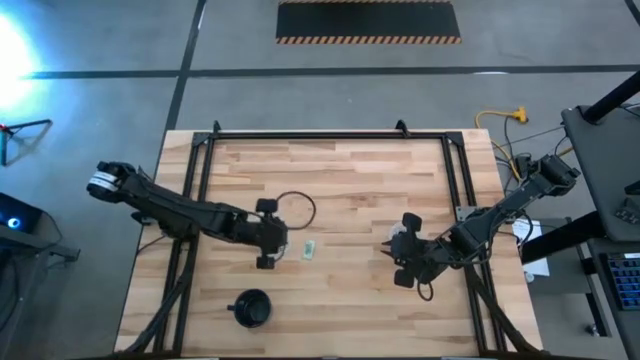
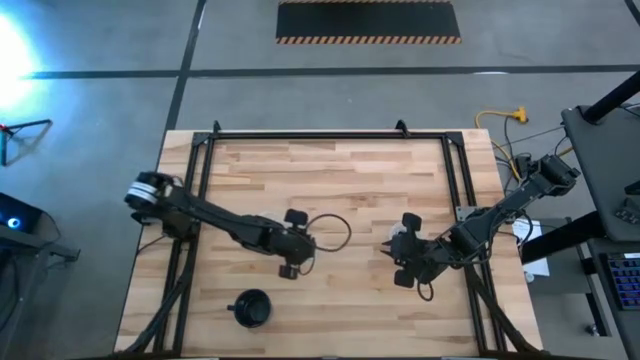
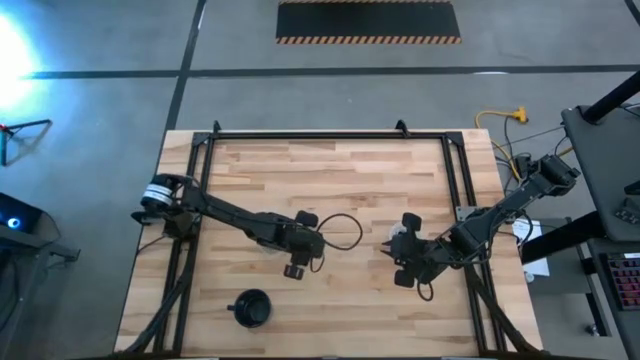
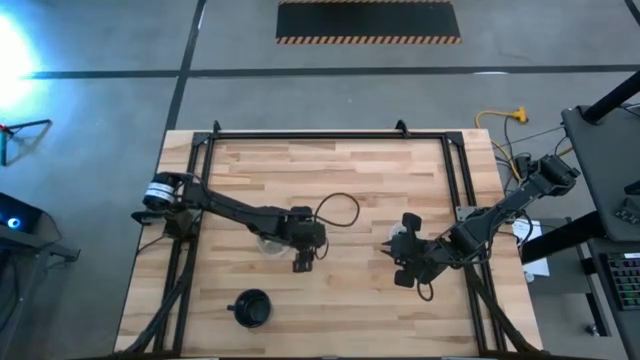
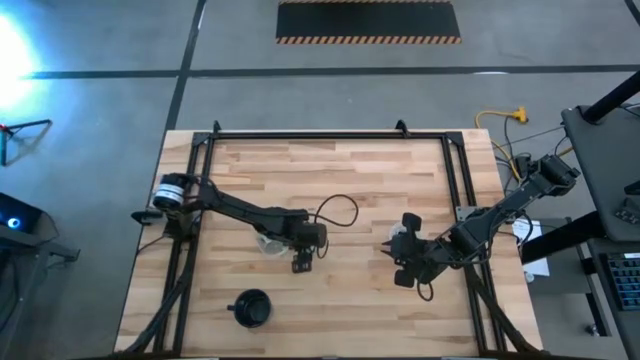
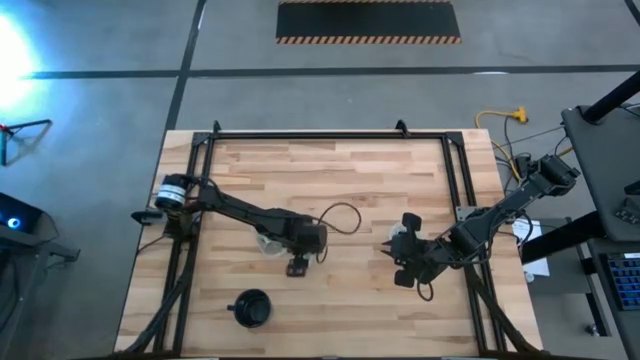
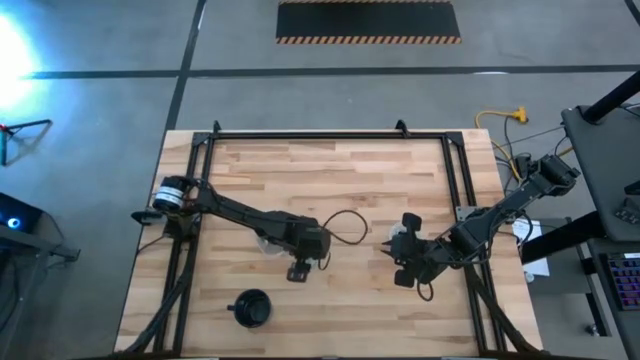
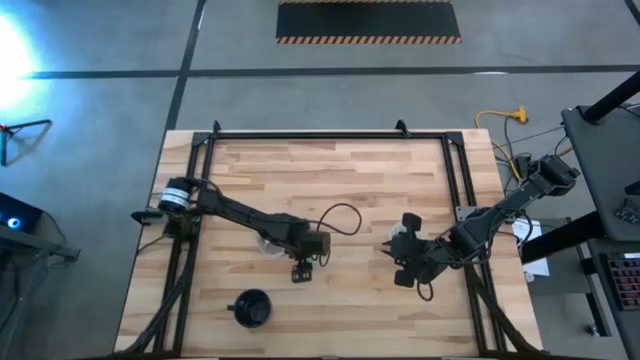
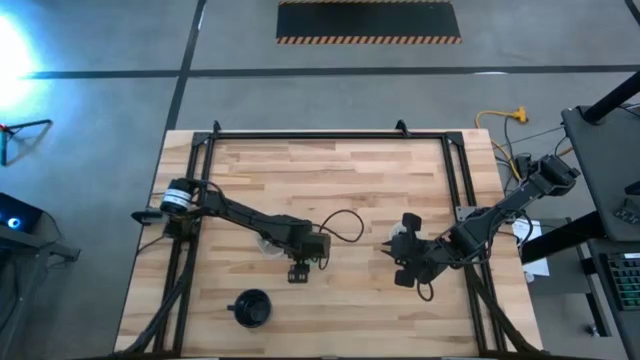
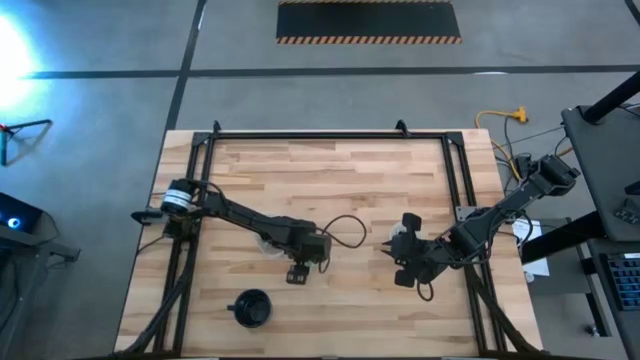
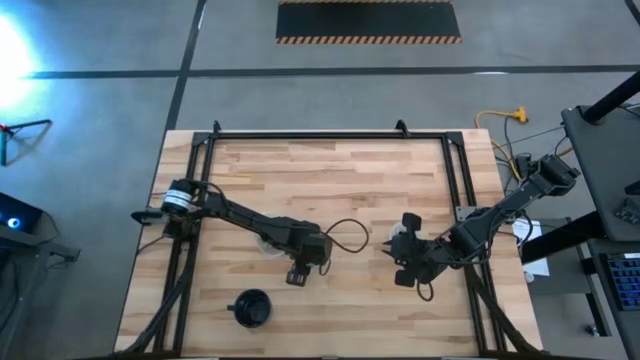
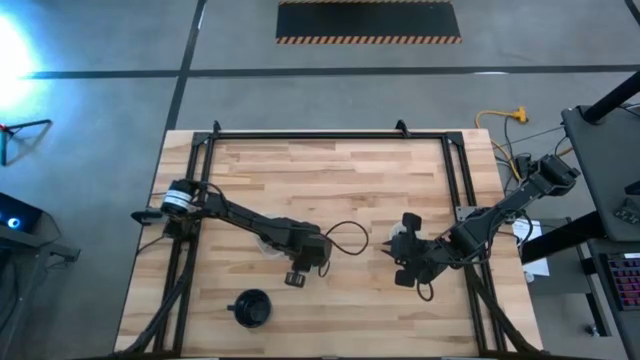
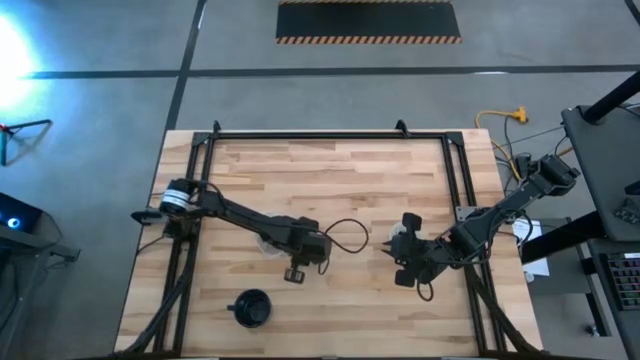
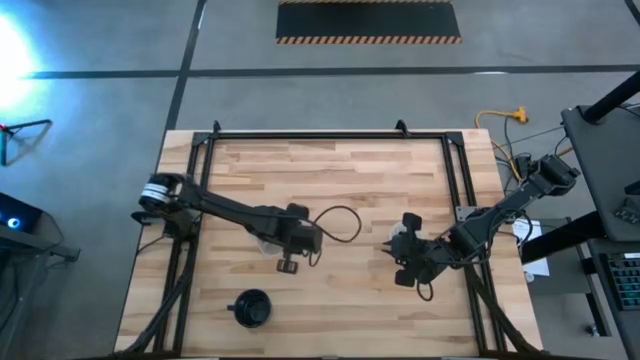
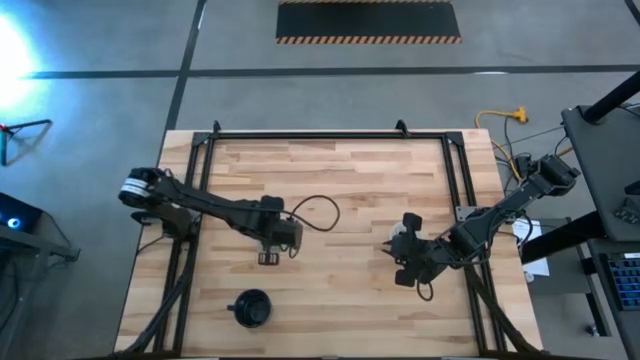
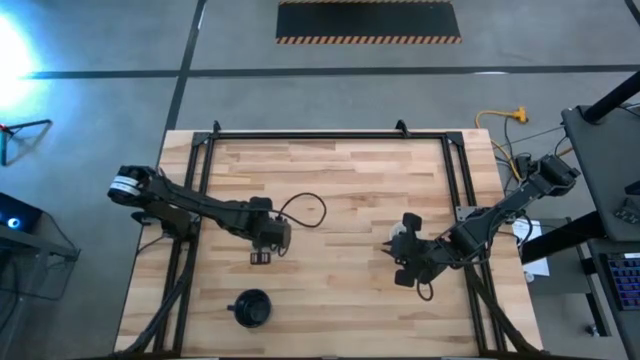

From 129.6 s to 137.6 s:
Task: Pick and place Stevia / Truvia into bins
Put the stevia packet into the oval transparent container

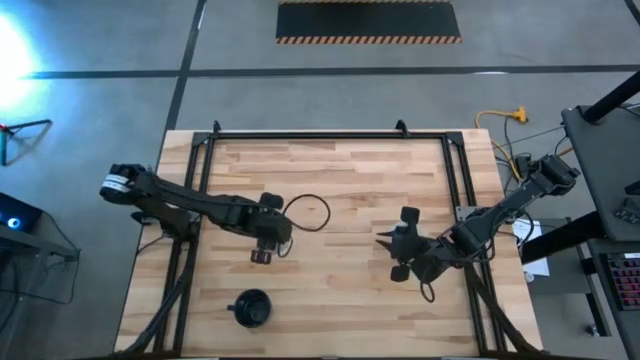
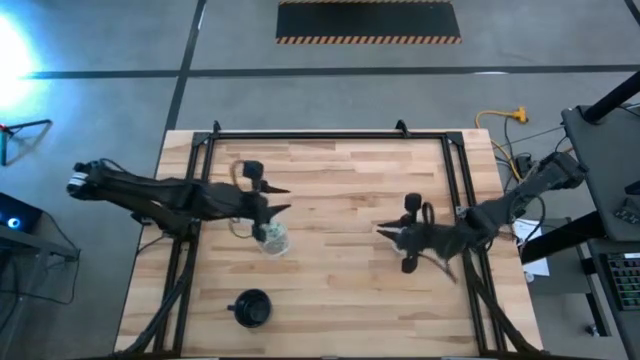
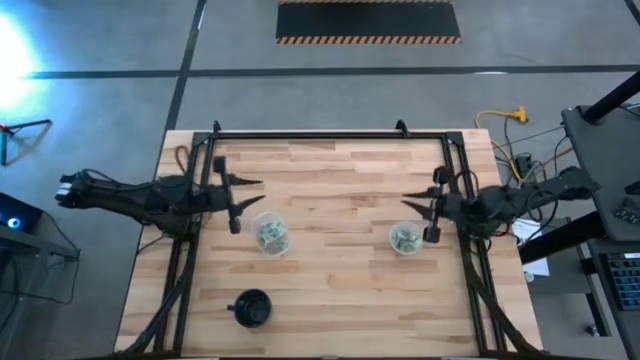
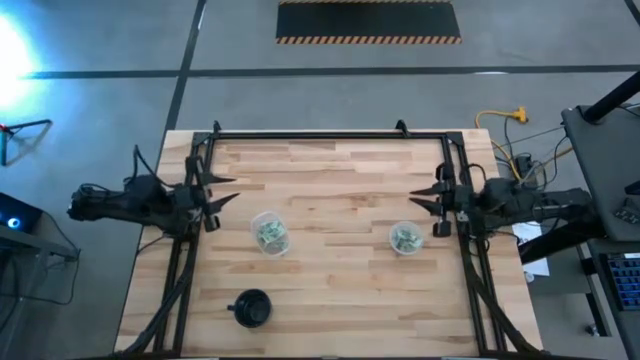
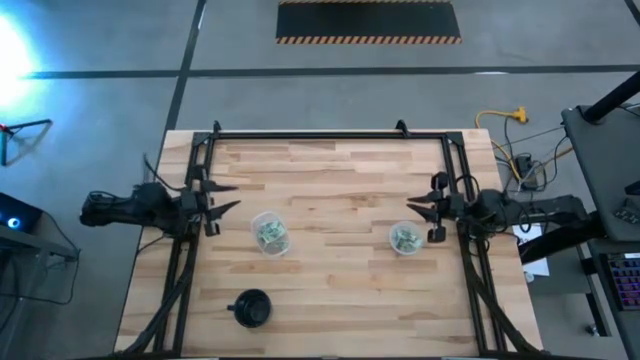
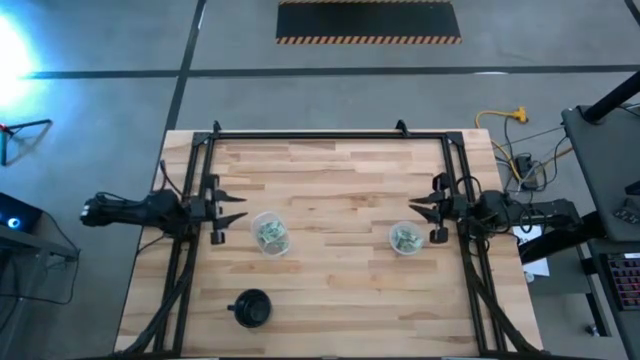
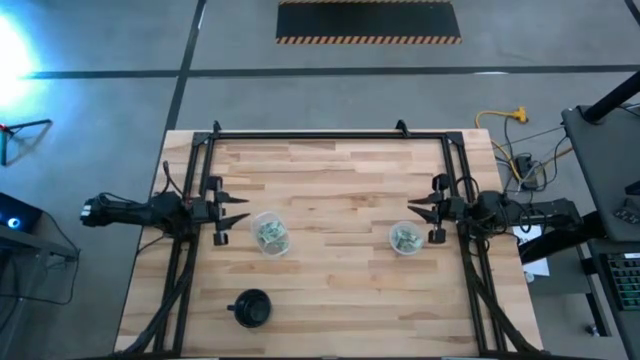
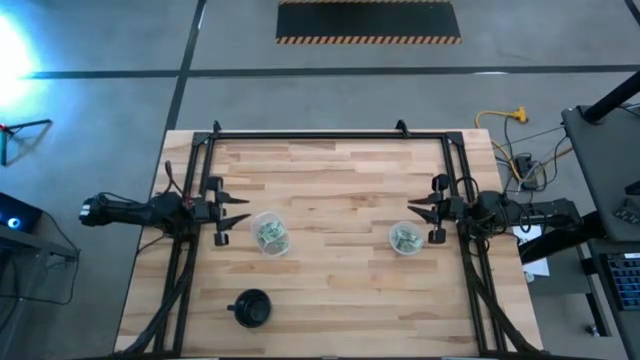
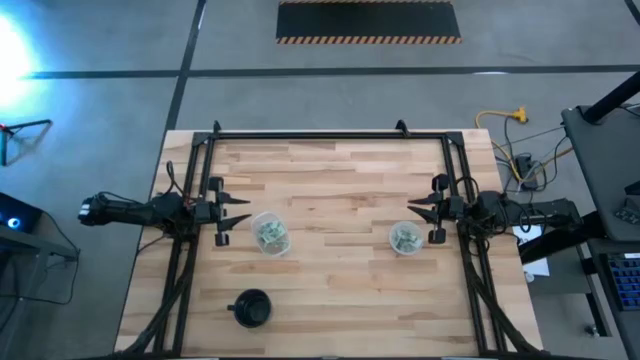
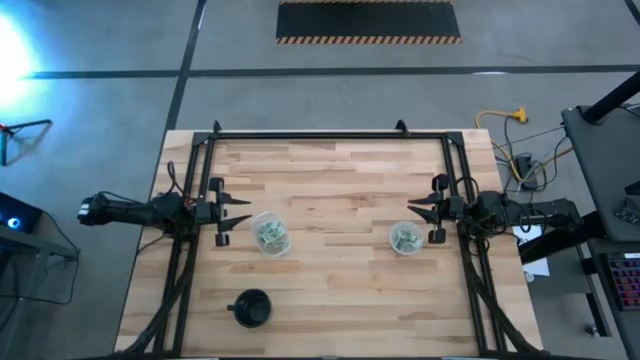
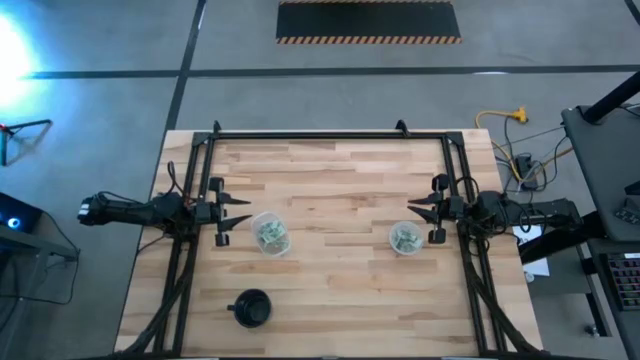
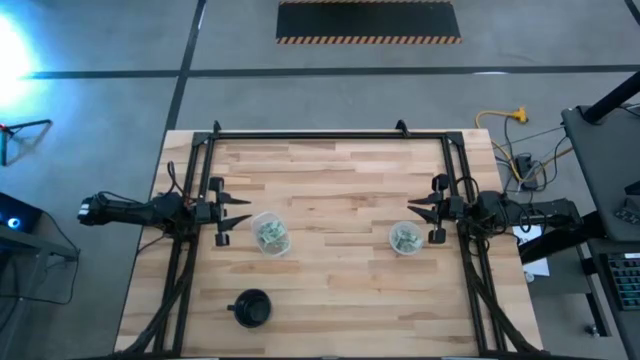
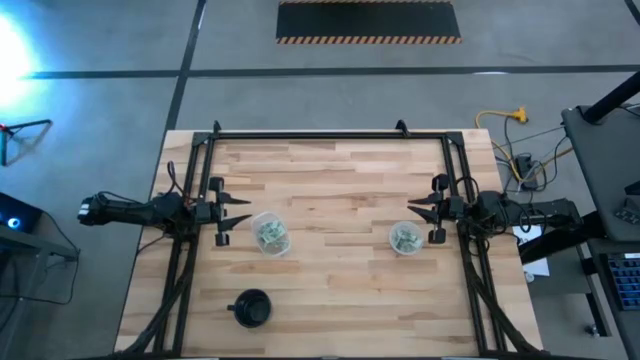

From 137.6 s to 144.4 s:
Return to Home Position
